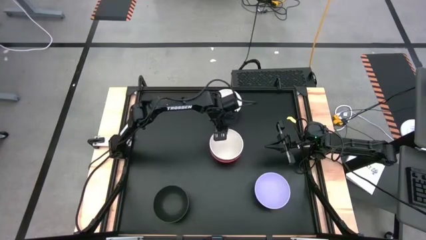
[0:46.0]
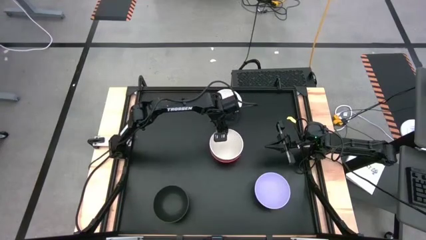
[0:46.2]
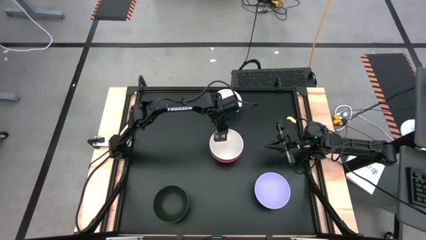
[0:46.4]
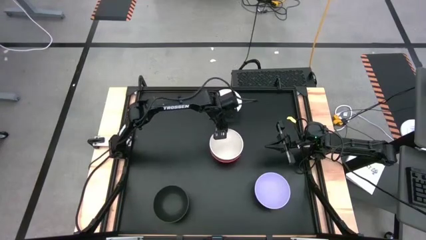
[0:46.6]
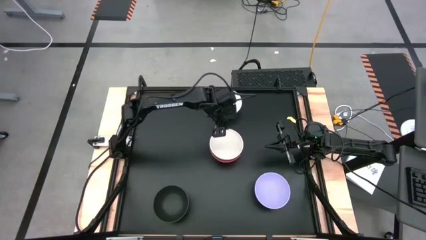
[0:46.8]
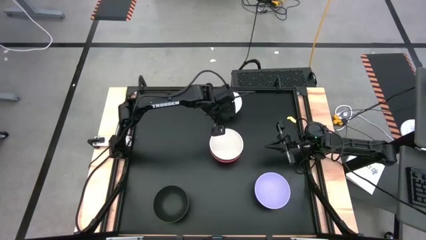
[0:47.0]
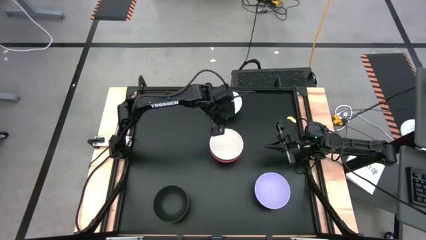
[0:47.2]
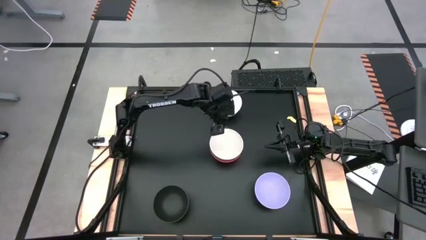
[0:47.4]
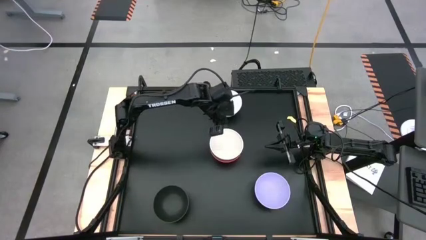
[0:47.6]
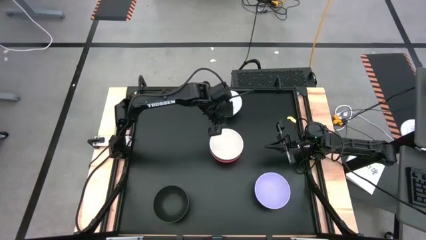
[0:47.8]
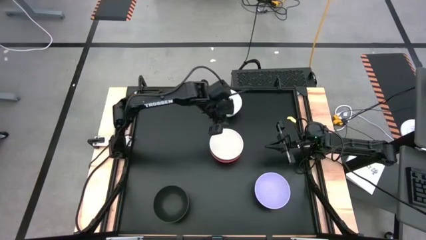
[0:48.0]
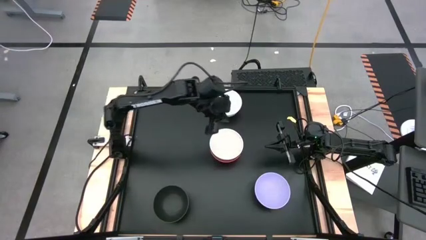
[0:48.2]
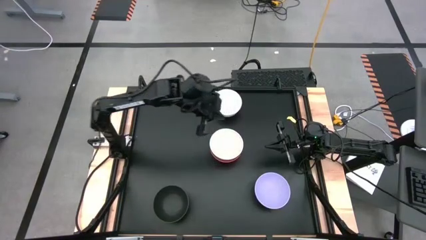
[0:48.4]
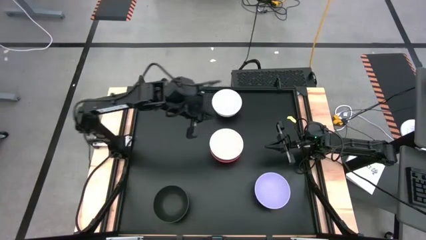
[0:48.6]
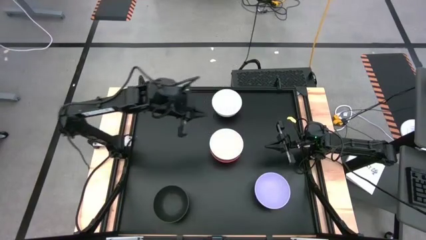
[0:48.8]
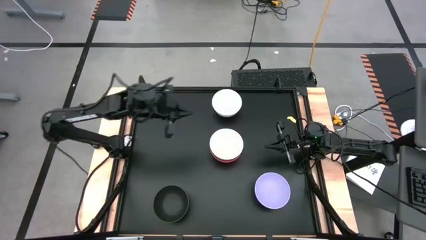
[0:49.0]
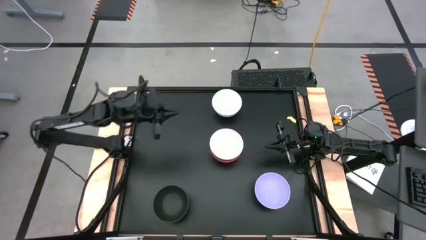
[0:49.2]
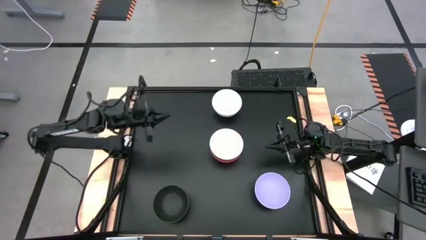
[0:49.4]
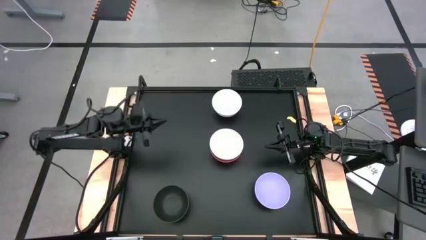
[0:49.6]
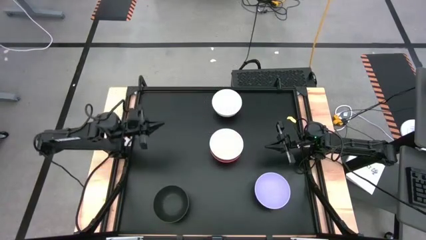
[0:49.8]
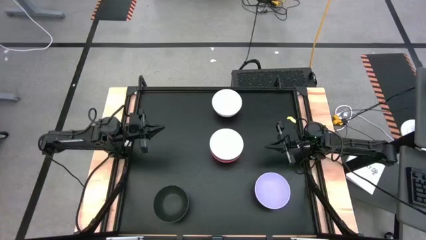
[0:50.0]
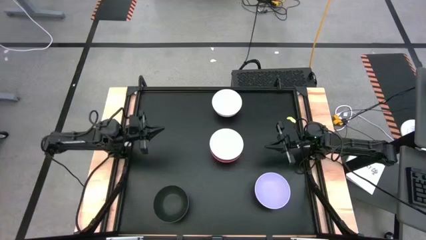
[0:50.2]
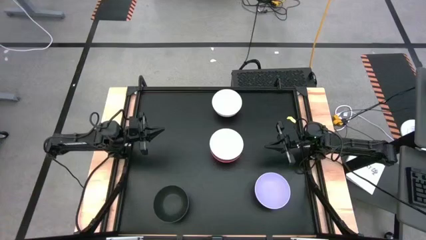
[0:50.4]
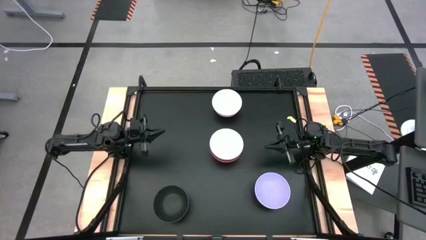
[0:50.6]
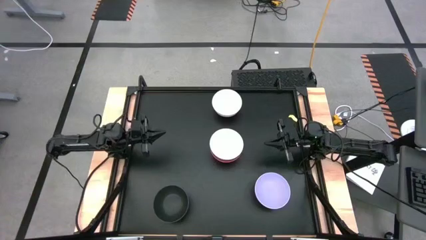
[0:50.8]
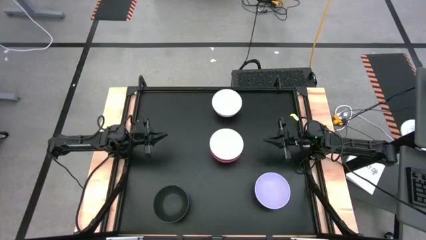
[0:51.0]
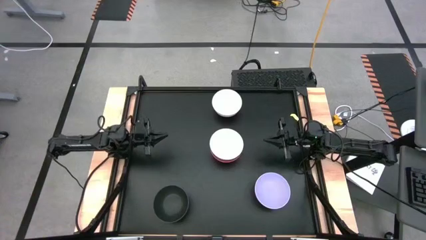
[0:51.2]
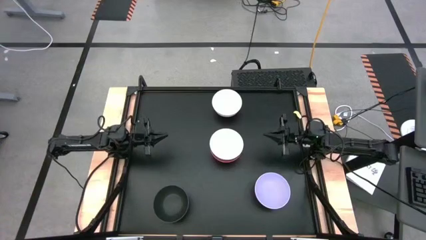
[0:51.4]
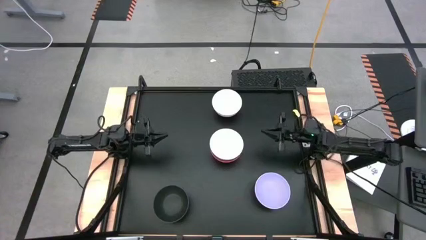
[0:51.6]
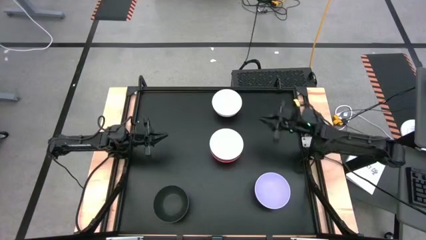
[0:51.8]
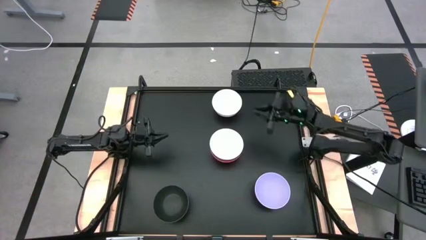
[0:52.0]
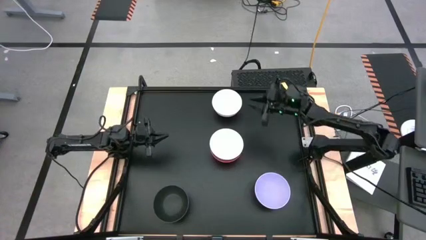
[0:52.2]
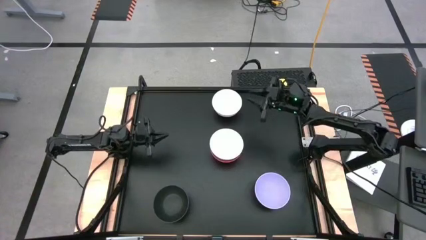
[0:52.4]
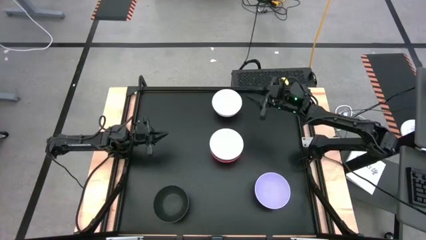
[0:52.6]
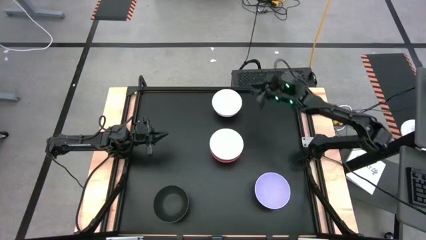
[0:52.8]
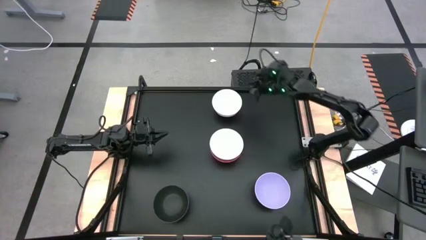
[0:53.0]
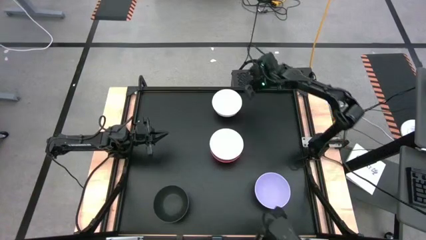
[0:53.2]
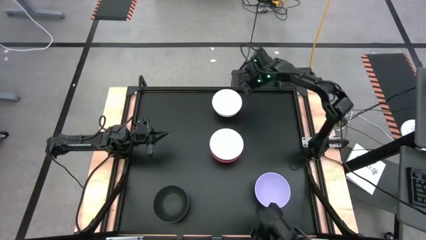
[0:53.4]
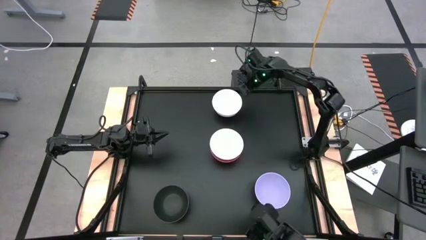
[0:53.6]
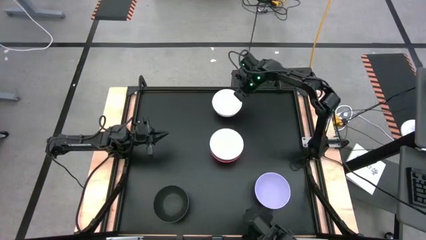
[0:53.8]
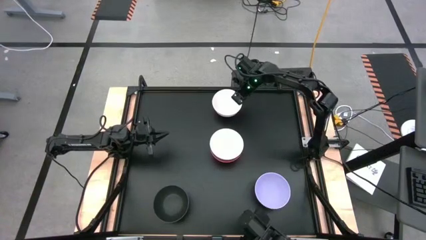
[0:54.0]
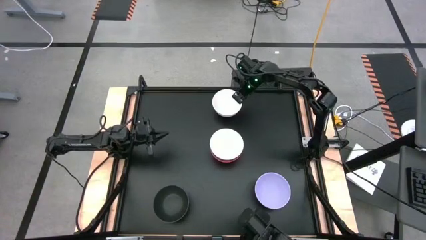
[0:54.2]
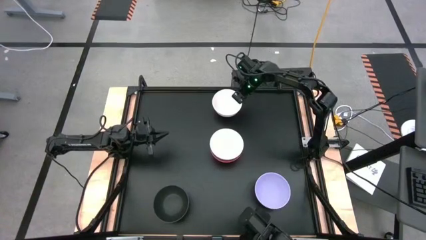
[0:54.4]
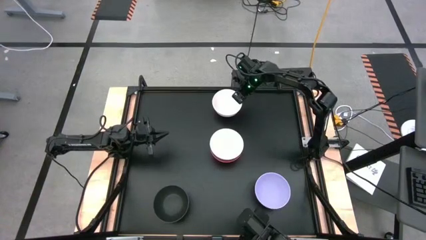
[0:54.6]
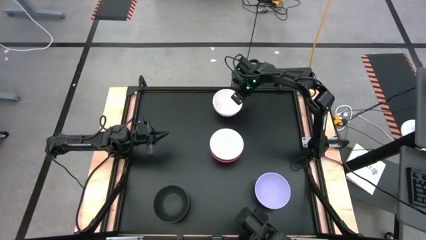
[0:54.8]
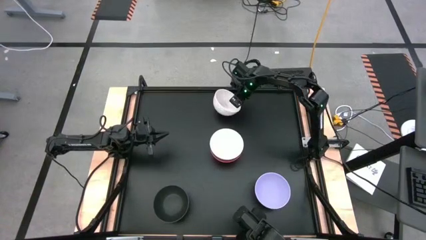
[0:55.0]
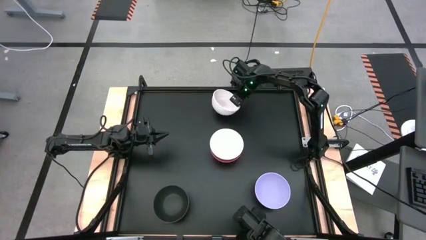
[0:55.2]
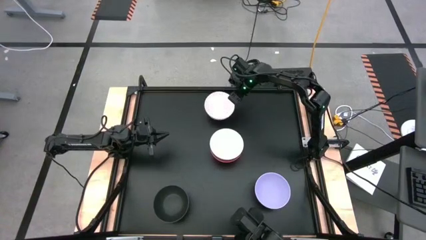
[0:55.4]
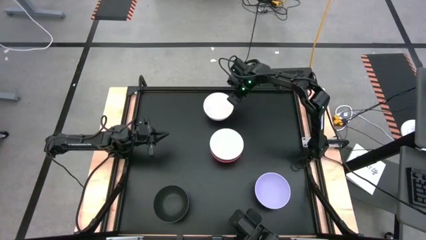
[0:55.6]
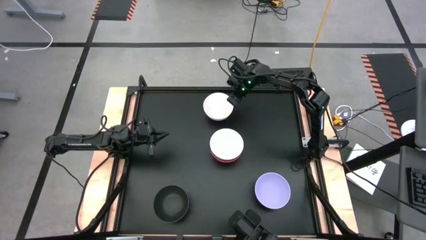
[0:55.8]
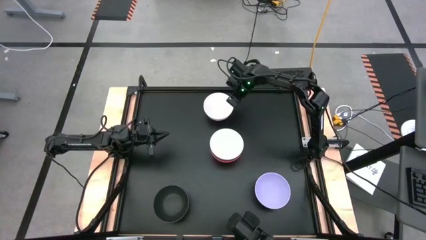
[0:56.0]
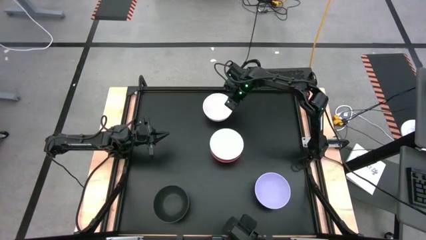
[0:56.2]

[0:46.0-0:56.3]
Task: Nest bowls inside each other
Stack the white bowl on top of the white bowl

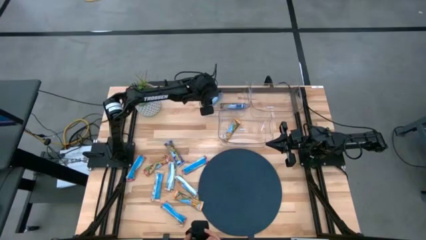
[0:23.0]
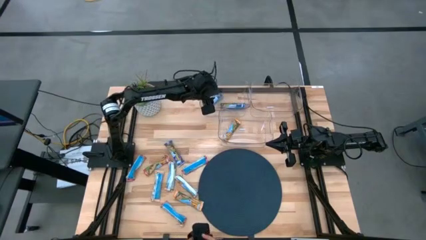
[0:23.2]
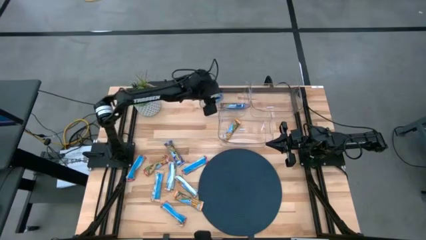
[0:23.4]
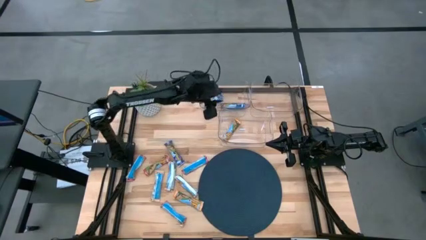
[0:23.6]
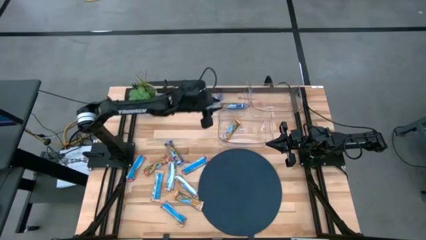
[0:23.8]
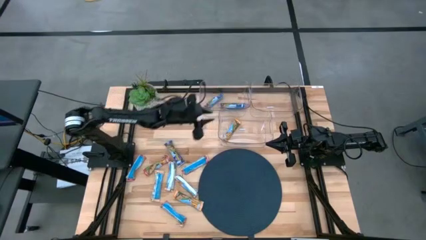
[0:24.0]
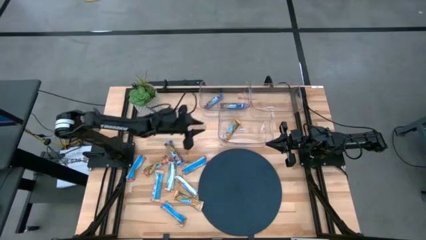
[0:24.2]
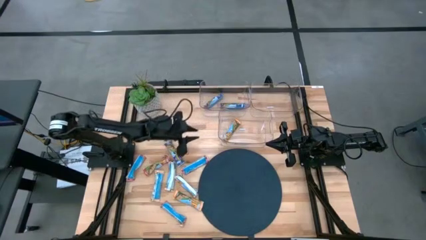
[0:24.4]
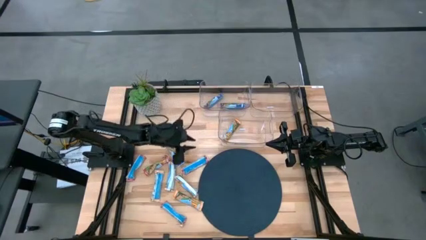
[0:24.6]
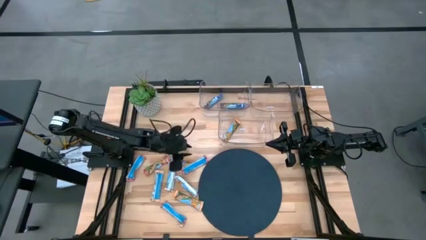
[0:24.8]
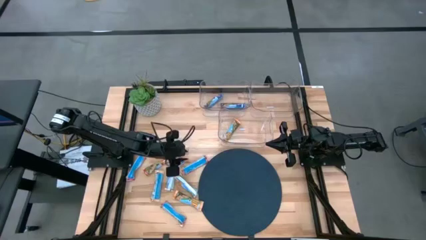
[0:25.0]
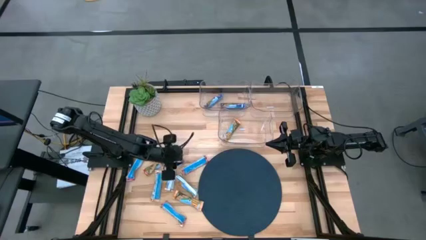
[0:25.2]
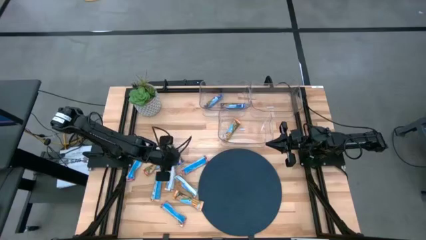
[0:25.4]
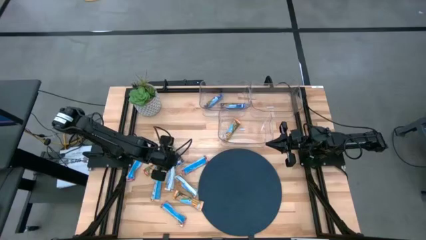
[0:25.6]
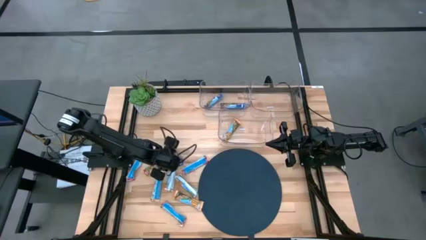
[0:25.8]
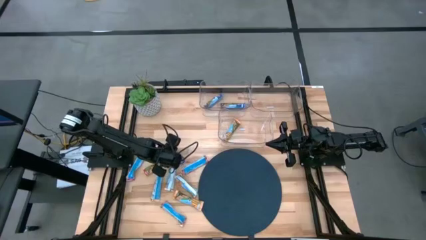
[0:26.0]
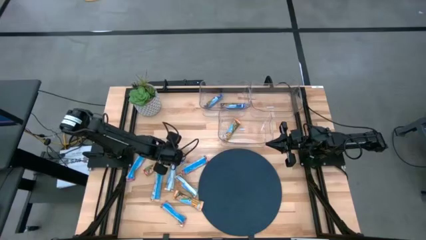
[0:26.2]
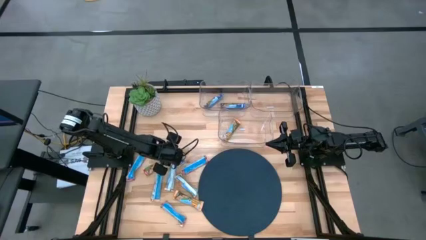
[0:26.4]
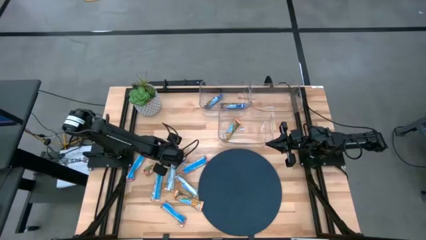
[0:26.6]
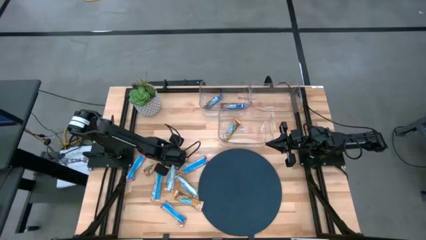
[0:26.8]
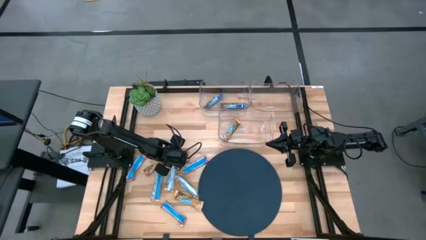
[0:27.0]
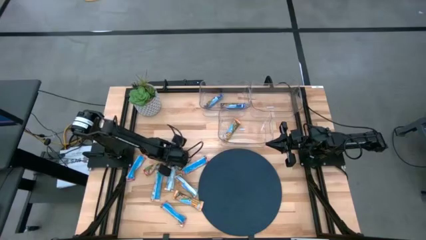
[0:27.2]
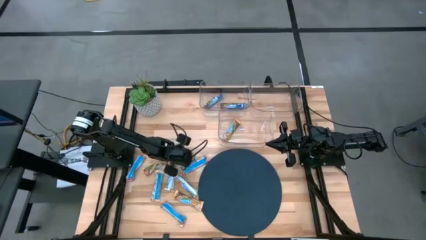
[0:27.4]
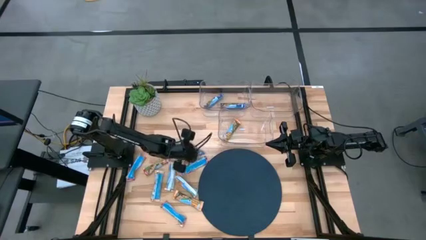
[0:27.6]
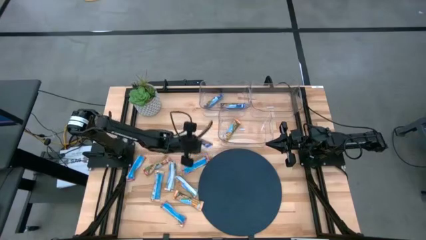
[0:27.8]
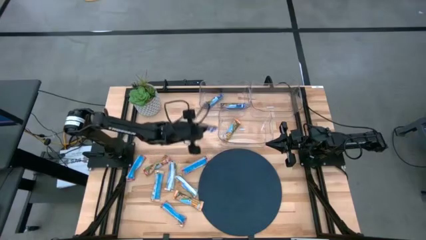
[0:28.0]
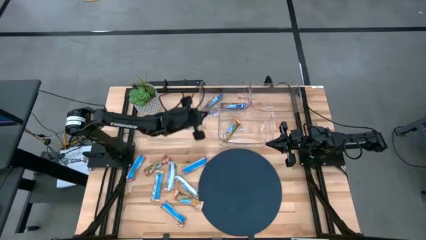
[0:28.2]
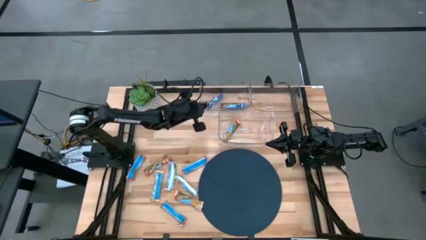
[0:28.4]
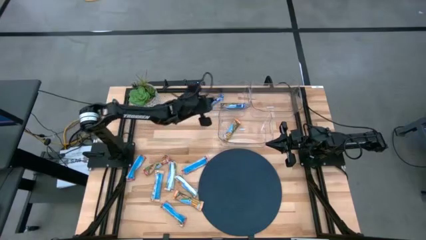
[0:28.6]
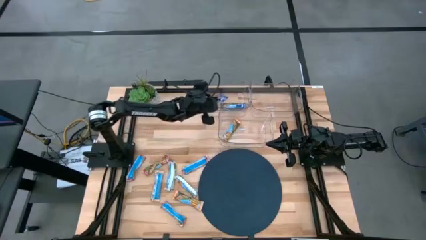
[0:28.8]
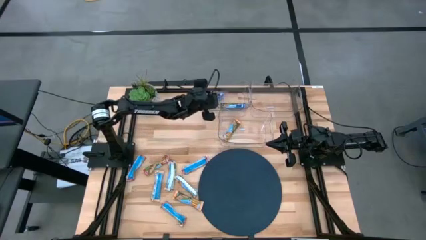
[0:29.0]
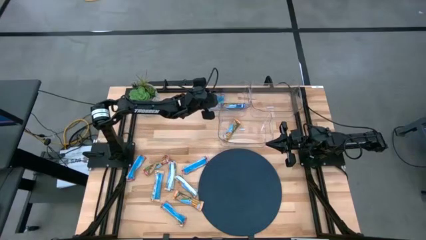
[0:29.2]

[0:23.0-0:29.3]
Task: Pick and place Granola Bars by type
Put the blue granola bar into the top left transparent bin
